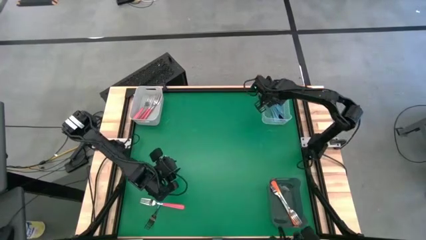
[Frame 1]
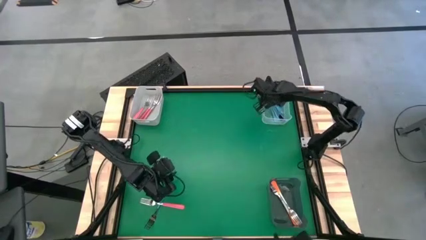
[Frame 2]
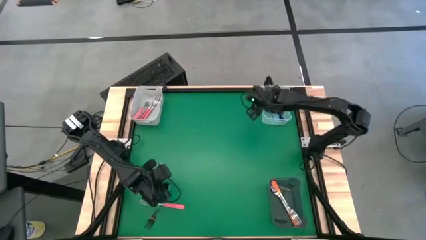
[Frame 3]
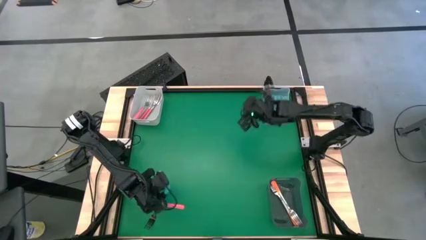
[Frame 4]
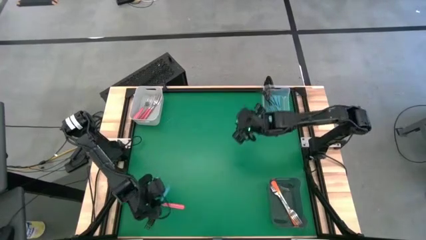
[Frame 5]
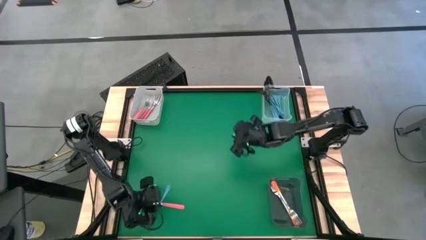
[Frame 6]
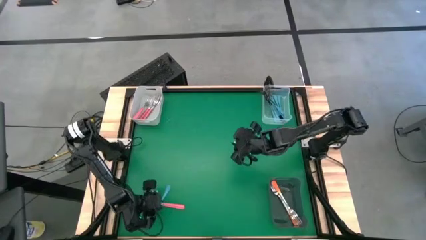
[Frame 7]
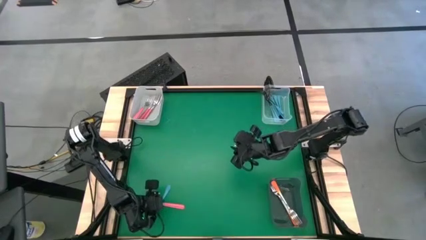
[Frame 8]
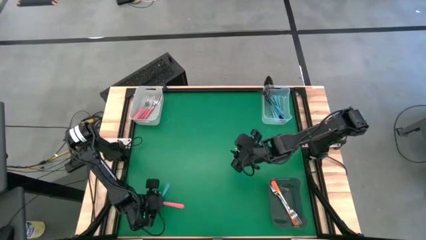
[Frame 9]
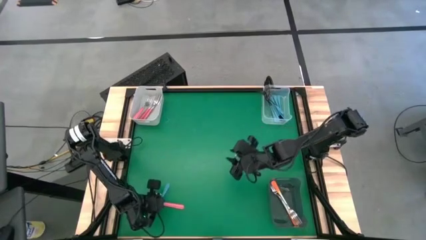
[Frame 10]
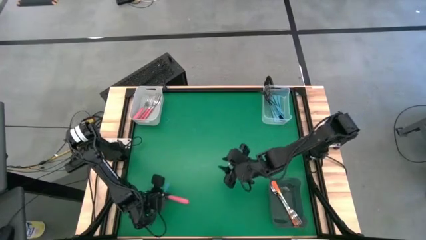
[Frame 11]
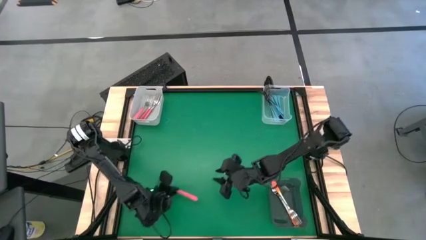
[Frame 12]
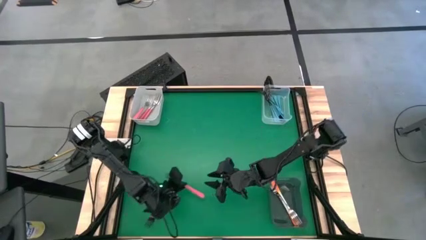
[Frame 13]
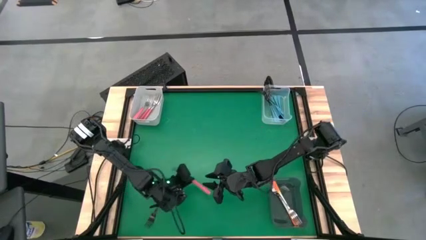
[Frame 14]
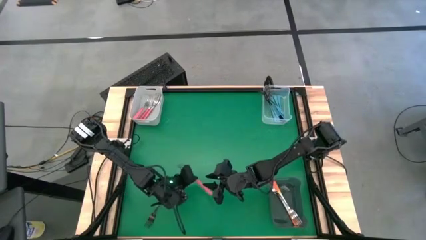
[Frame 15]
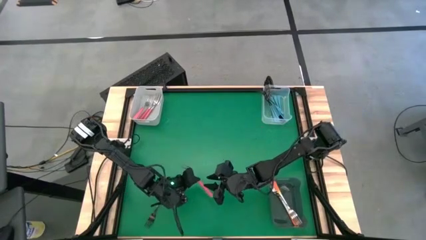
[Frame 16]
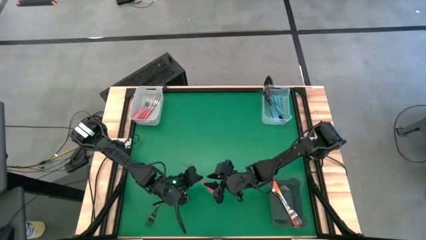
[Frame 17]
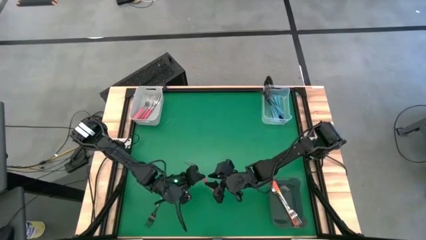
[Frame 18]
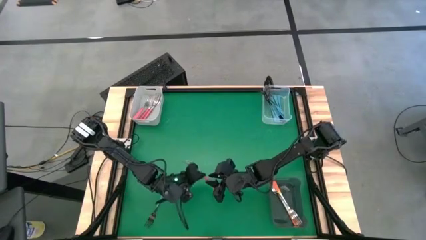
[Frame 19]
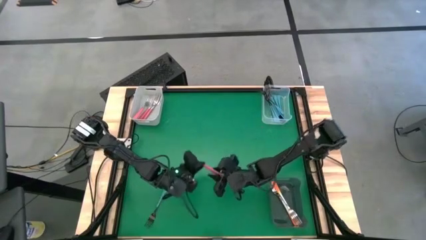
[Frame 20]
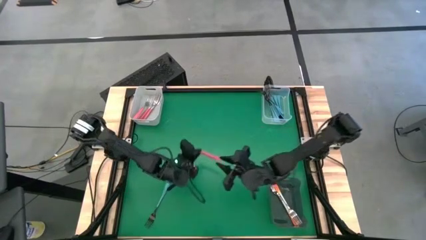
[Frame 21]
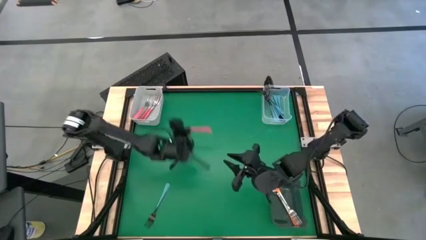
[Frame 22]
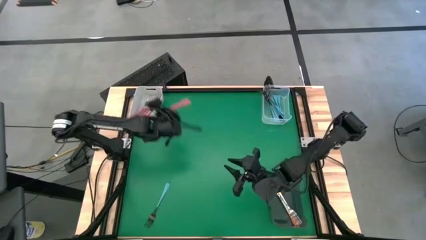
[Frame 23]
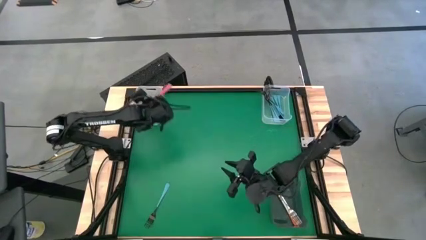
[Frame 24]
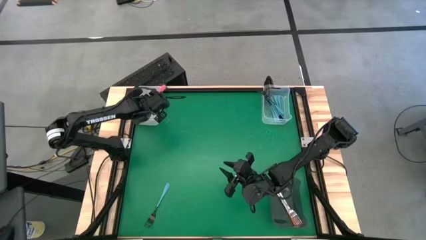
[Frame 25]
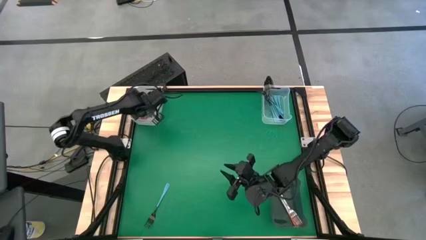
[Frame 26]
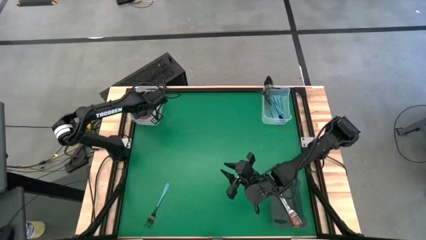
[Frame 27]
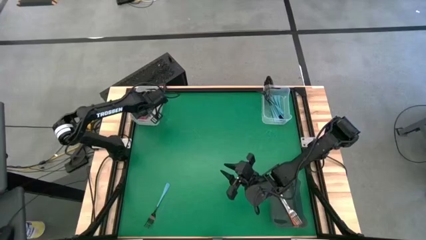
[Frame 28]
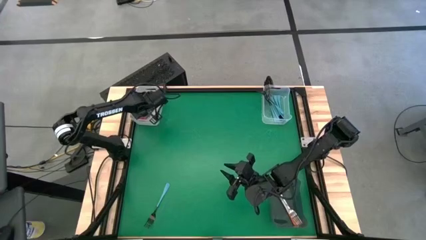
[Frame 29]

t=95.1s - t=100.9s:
Task: Sort silverware by color (type)
Put the pink fork into the white bin

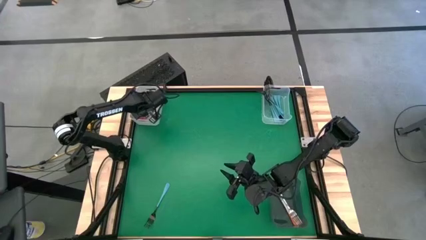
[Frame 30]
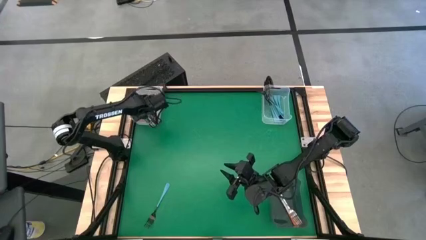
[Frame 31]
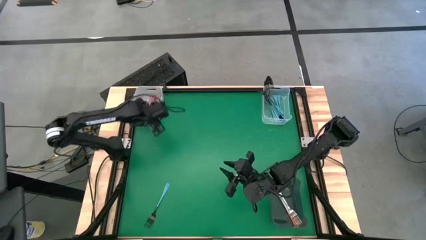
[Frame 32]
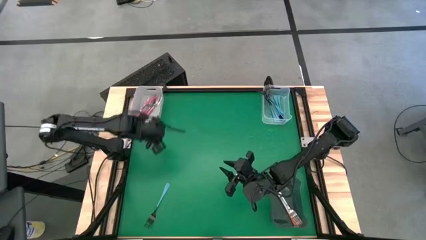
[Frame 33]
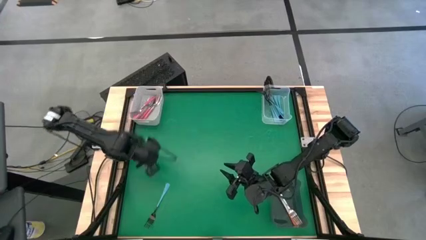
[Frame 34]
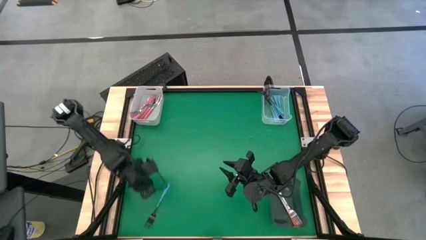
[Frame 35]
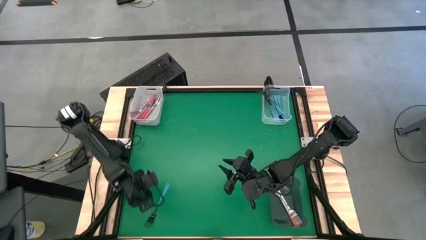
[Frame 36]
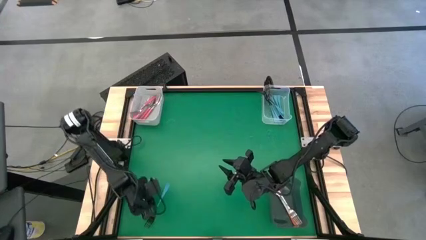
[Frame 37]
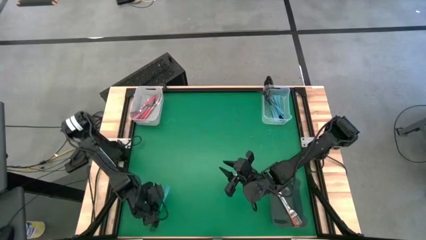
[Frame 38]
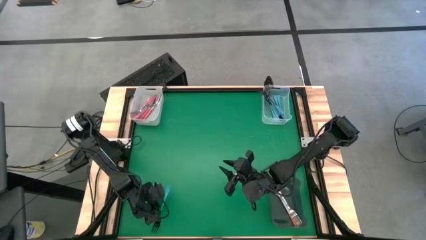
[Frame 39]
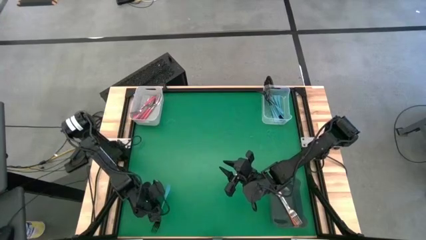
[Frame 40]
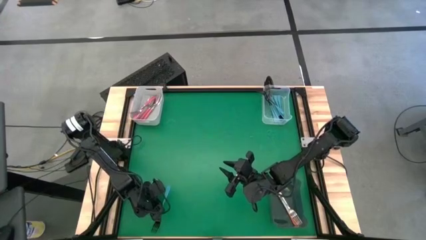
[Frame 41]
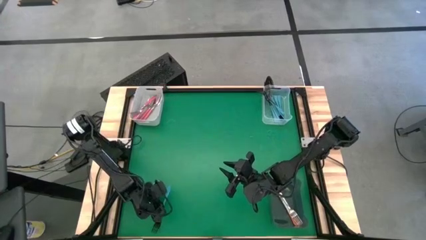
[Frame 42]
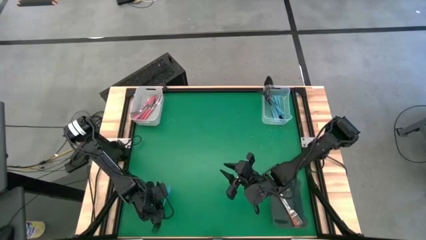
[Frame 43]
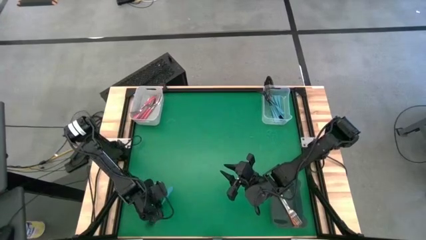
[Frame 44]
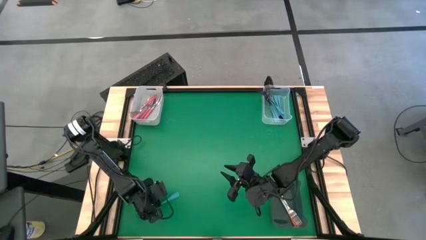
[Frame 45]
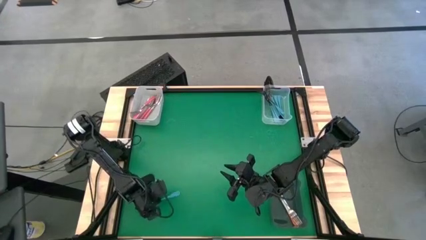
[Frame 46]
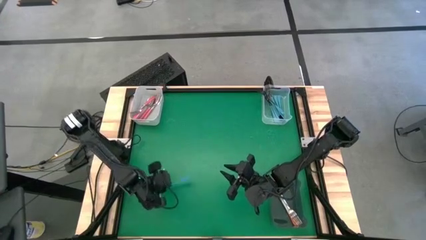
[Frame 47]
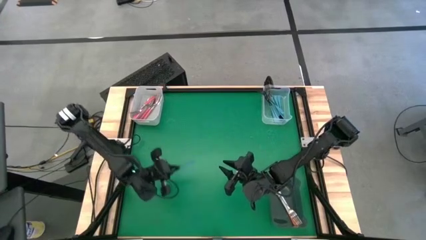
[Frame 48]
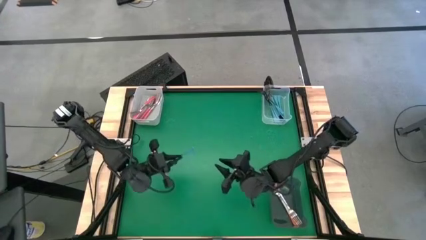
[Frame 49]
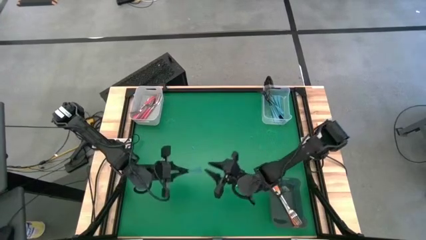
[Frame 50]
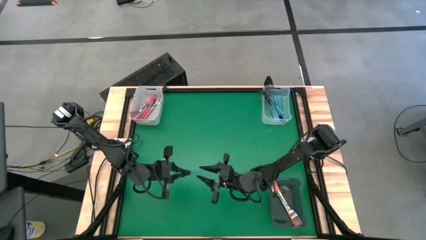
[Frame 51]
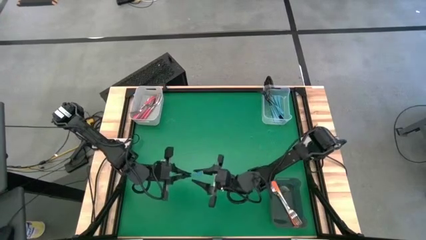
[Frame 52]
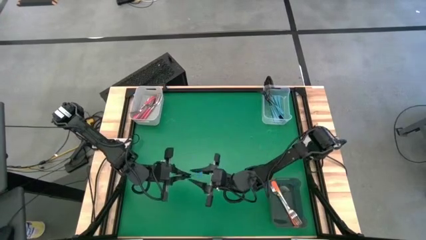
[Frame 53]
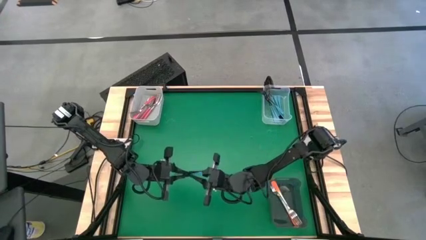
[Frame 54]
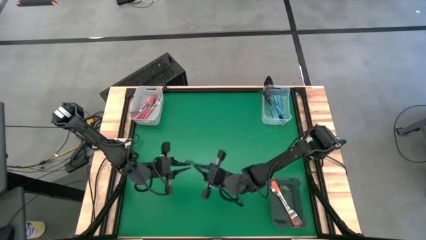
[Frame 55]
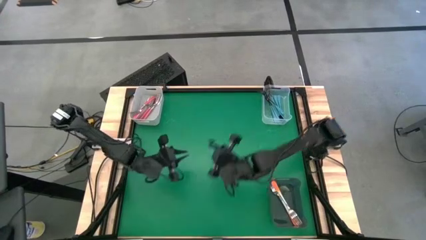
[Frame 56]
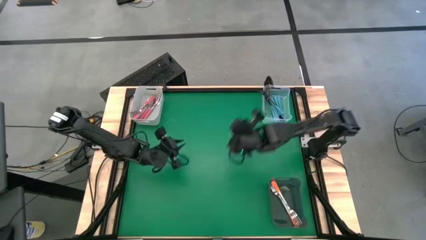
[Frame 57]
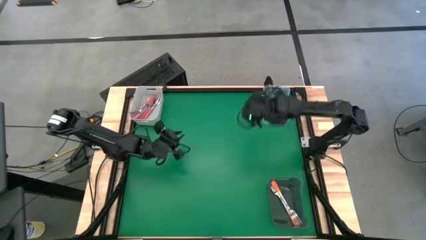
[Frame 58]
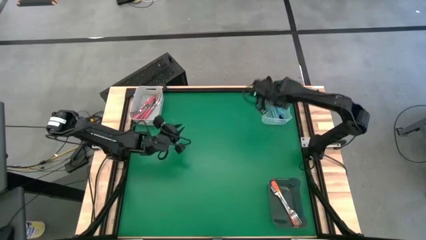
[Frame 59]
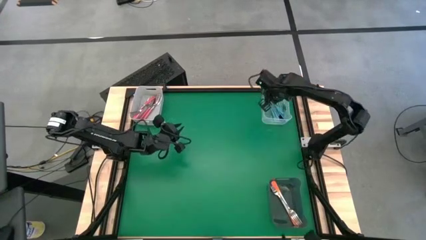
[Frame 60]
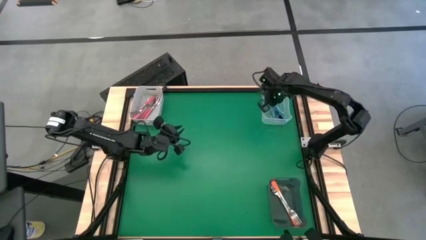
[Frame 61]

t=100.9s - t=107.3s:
Put the blue fork into the transparent bin

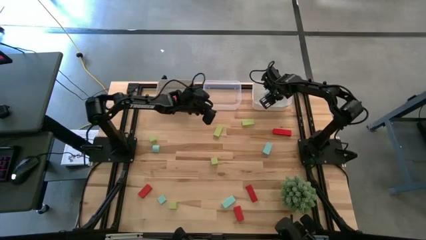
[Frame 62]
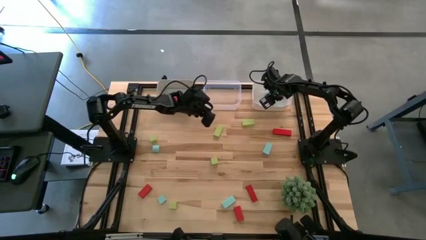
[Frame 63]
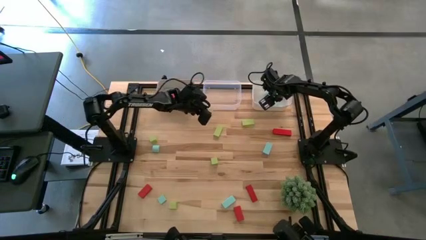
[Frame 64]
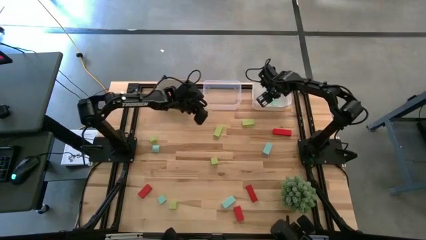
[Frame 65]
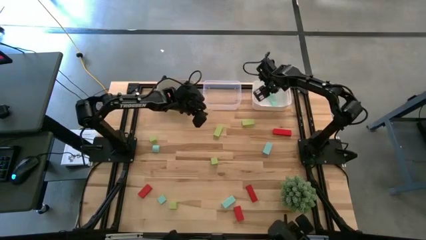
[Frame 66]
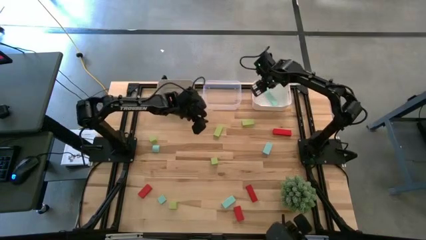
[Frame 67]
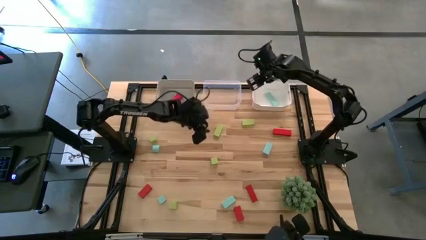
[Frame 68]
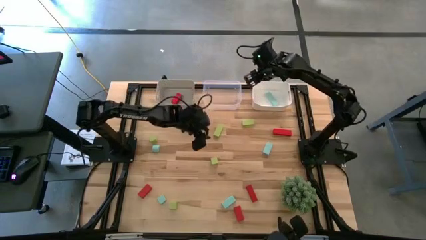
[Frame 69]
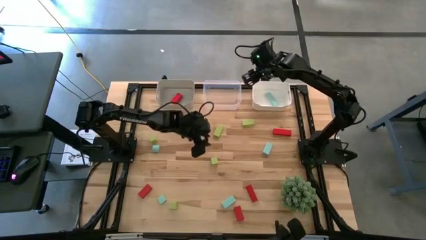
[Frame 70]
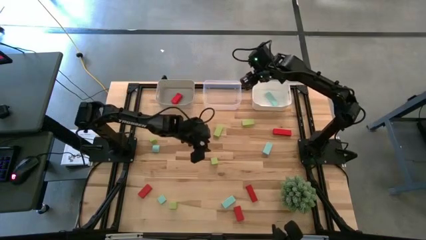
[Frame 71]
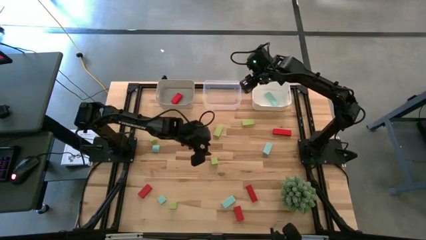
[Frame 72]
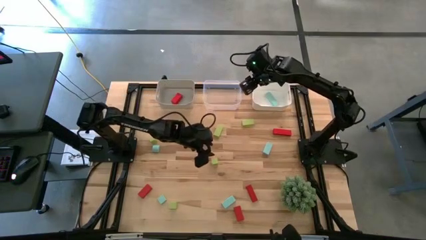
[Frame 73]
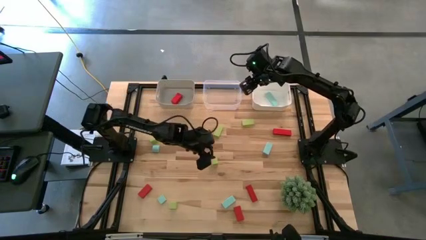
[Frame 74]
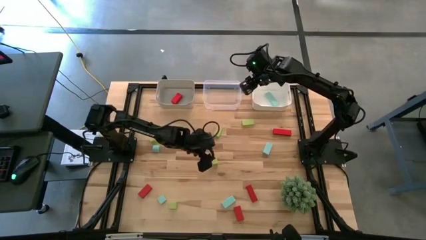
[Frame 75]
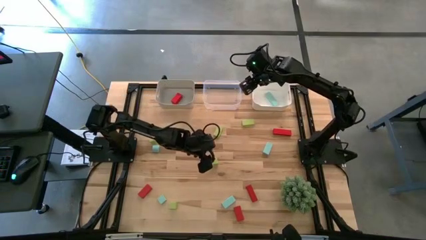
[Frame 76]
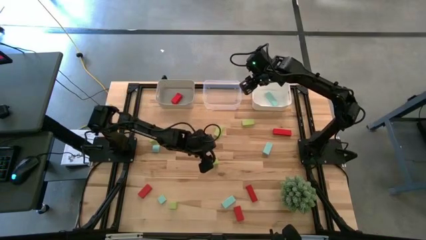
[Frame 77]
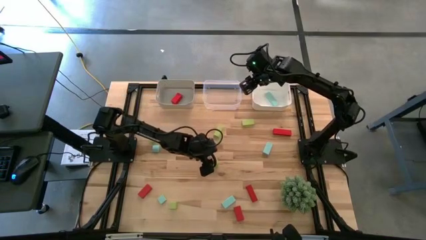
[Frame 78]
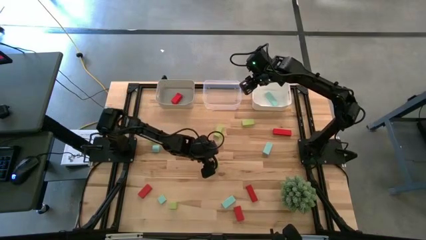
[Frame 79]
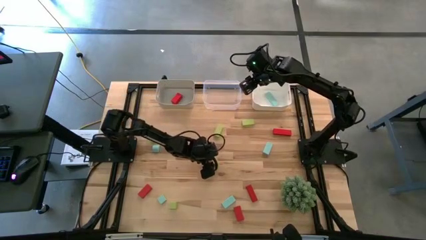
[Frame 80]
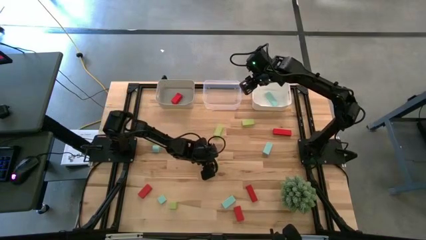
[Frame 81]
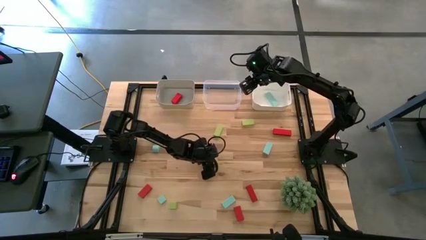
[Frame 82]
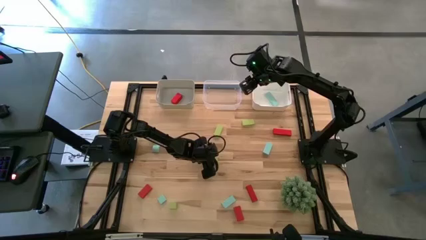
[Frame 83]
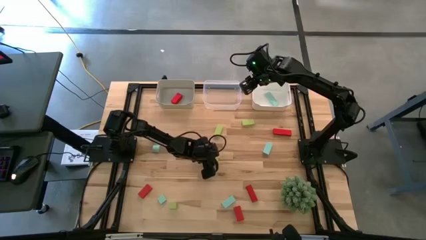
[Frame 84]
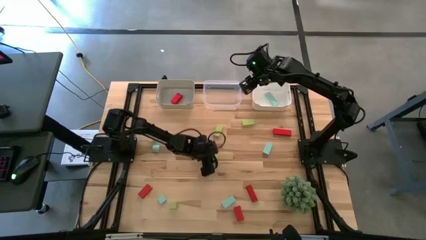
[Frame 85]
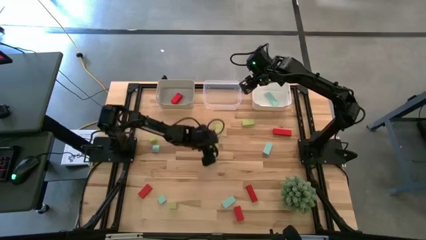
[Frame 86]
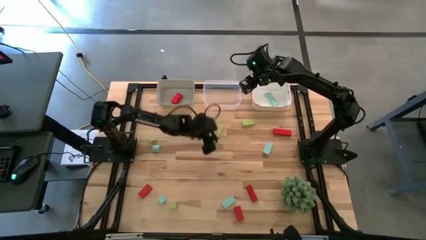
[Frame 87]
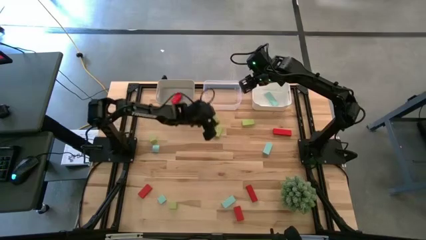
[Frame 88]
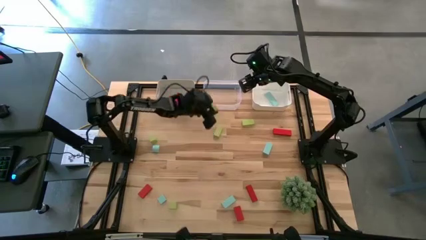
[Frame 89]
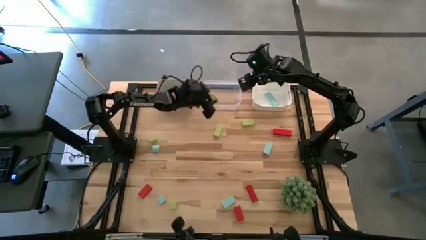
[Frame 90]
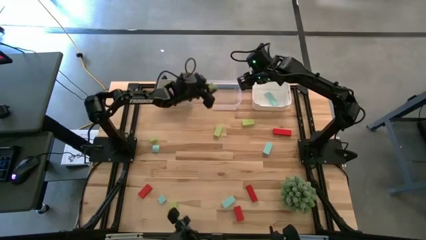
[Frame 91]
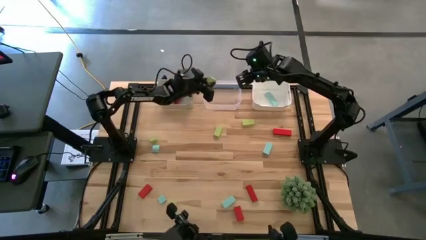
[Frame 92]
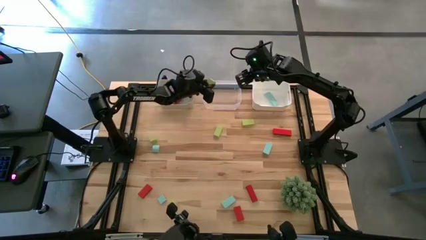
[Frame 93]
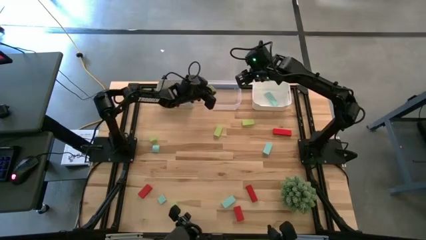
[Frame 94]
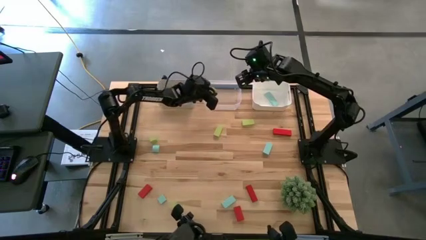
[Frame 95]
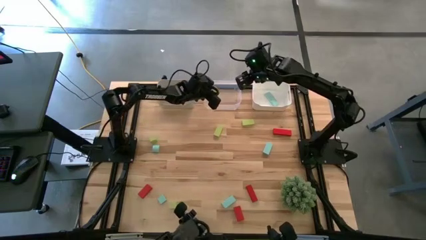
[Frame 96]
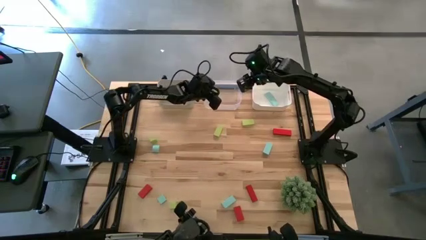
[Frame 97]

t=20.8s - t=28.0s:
Task: Sort & place blocks by color
Put the green block into the transparent bin
